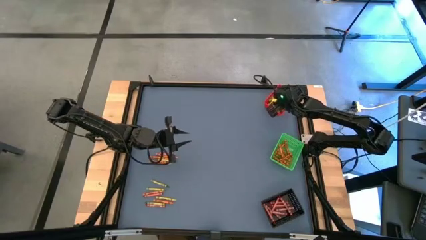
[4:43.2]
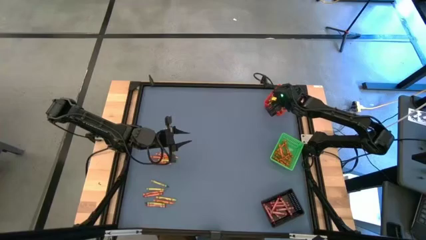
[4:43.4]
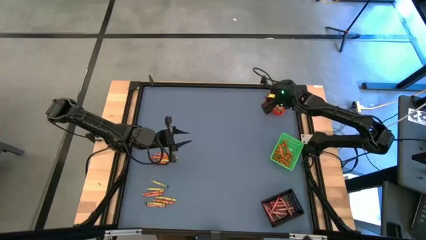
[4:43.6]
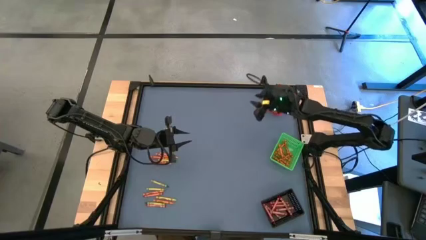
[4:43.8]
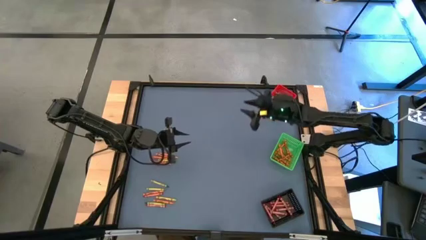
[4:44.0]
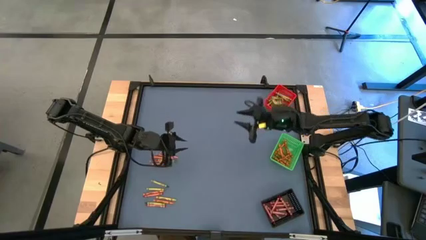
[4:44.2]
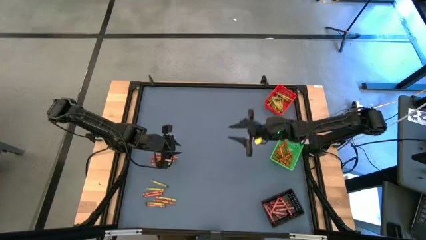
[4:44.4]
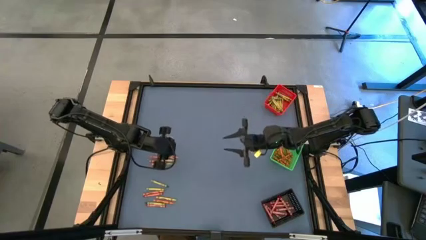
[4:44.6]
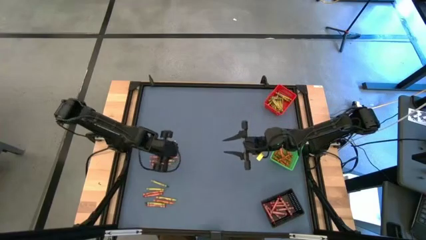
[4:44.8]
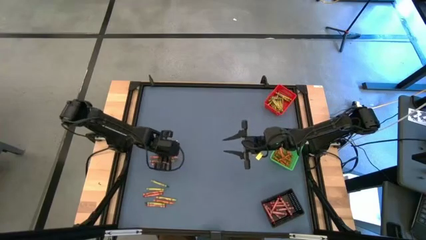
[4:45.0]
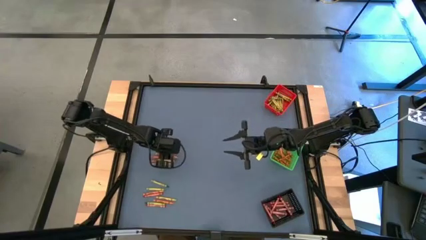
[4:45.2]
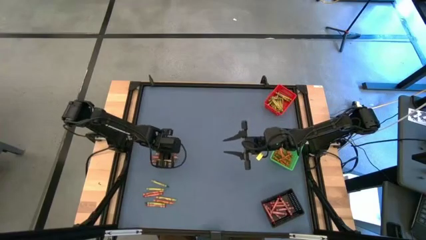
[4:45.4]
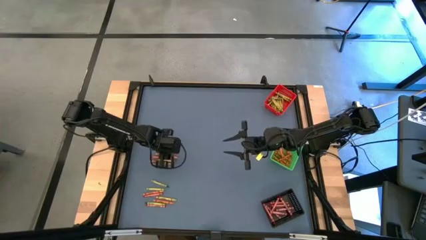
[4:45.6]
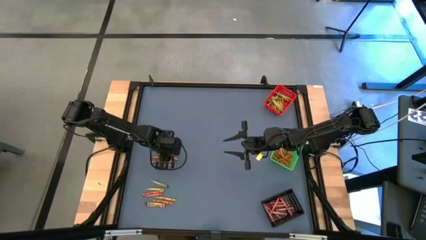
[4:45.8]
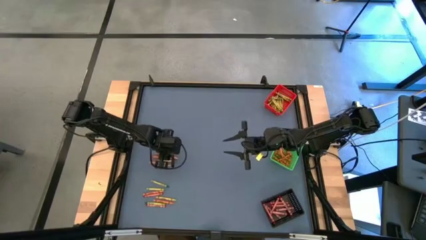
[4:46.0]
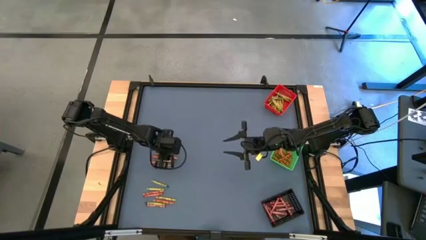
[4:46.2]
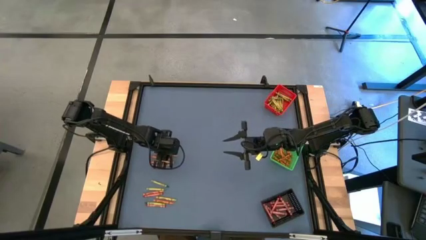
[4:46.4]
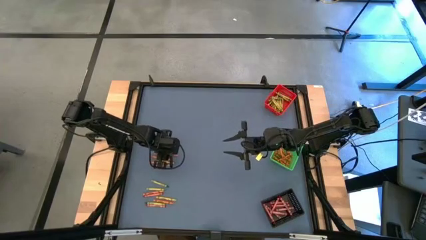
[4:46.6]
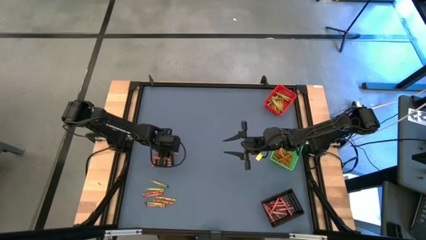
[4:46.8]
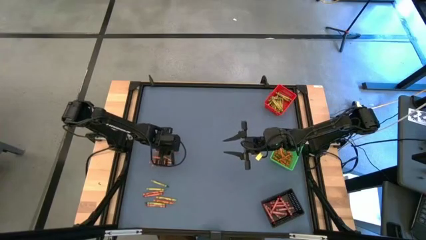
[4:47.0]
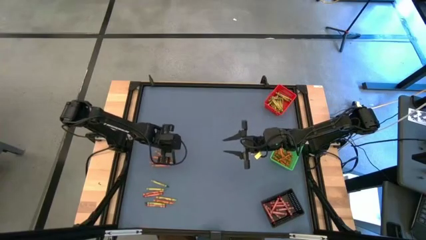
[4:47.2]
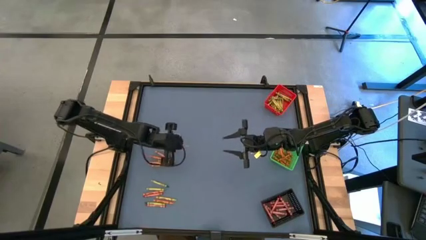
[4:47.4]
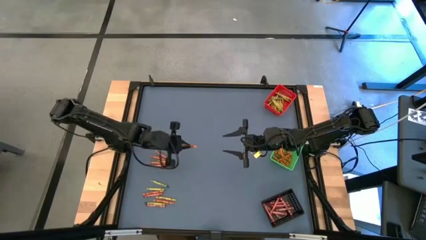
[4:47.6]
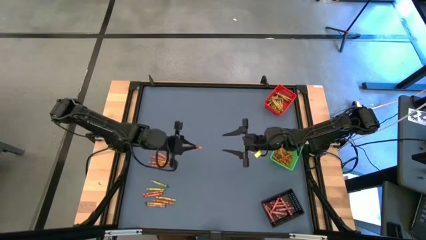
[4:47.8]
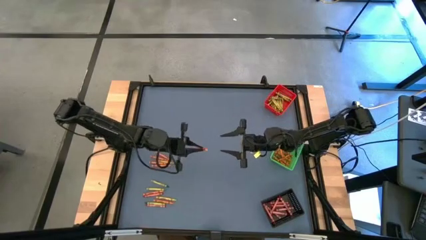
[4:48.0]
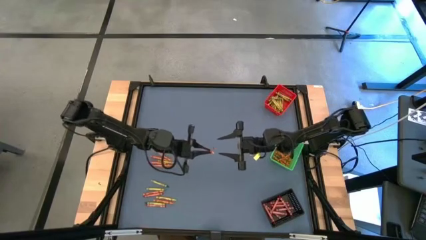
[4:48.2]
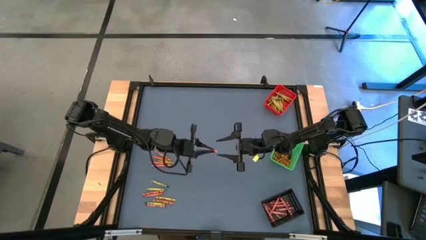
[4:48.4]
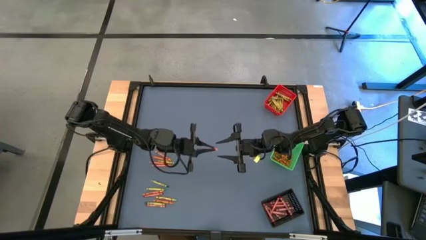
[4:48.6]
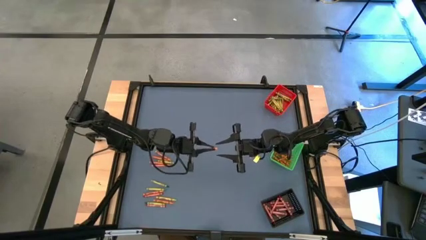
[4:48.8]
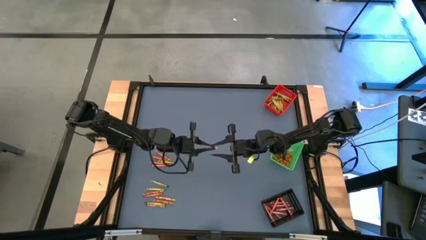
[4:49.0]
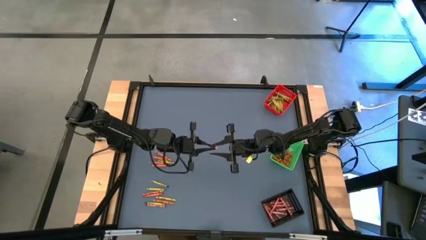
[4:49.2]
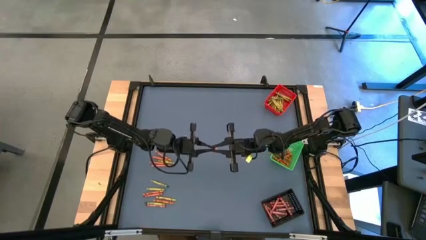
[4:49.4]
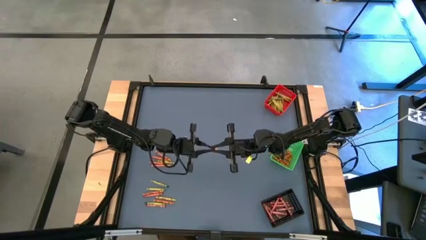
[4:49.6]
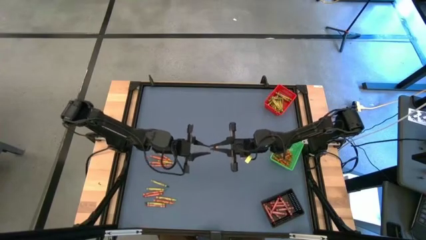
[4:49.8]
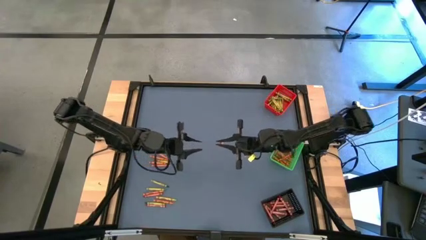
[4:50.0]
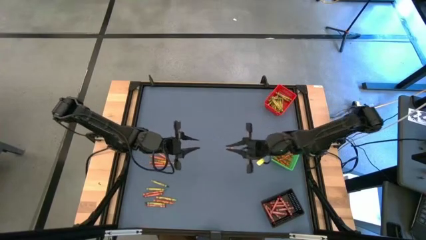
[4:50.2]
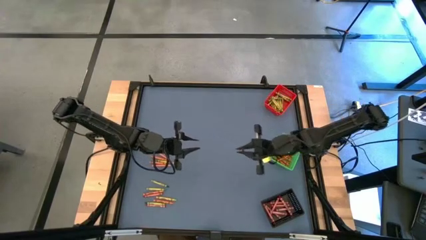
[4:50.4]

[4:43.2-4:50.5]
Task: Sort crayons
Put the orange crayon into the green bin

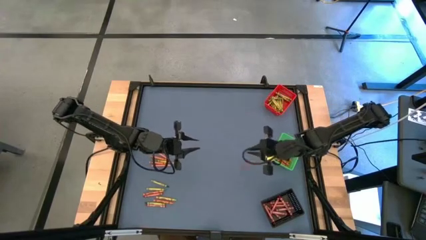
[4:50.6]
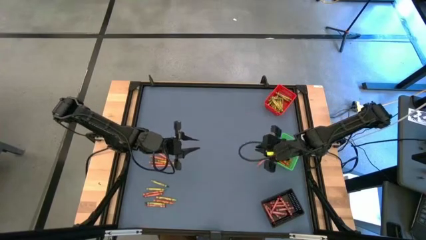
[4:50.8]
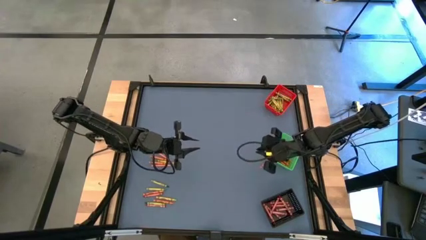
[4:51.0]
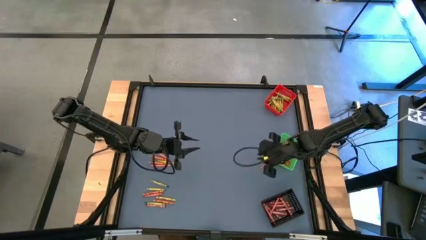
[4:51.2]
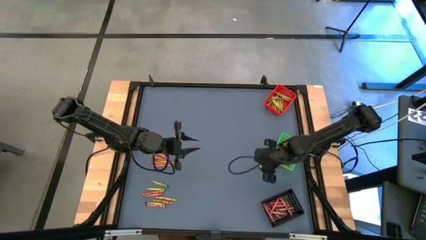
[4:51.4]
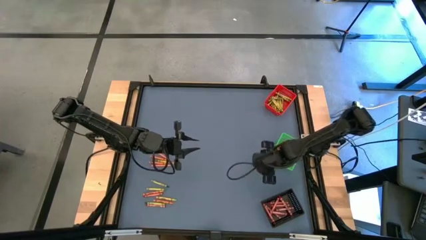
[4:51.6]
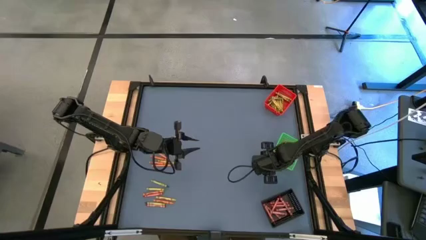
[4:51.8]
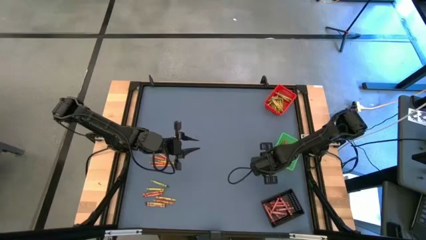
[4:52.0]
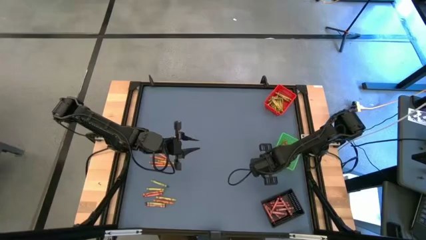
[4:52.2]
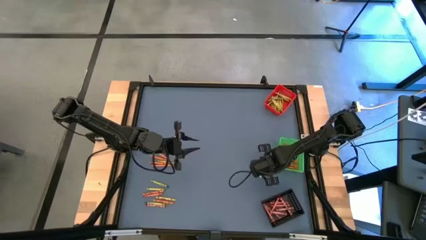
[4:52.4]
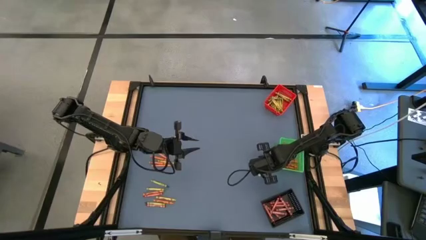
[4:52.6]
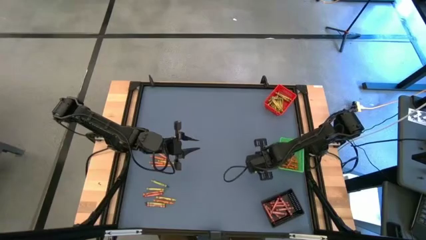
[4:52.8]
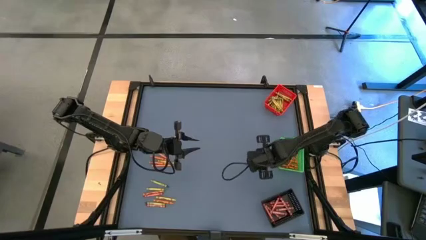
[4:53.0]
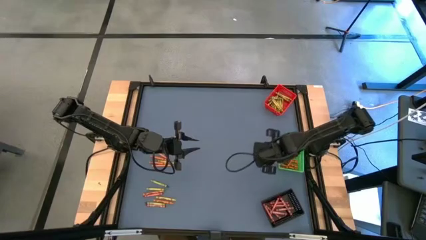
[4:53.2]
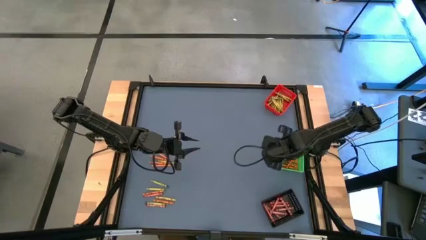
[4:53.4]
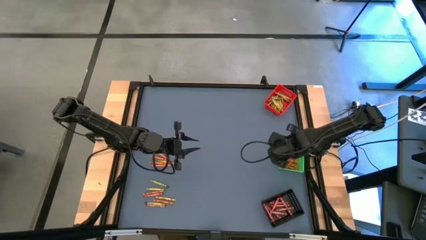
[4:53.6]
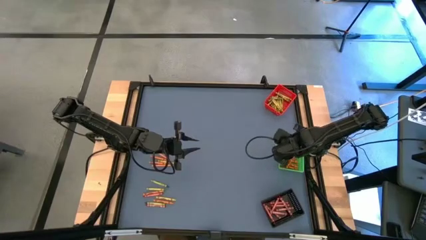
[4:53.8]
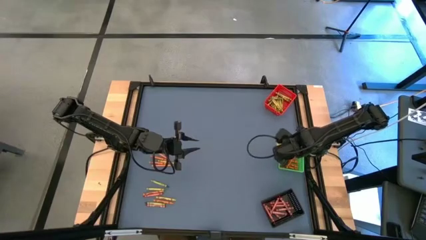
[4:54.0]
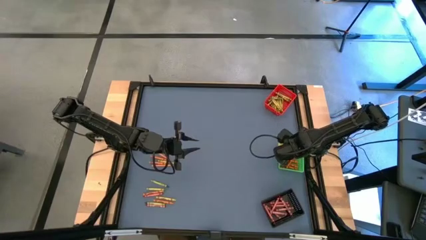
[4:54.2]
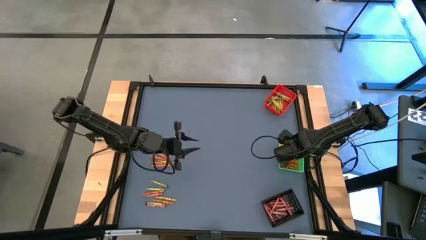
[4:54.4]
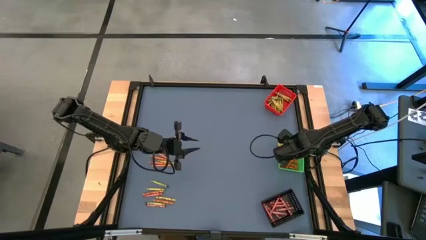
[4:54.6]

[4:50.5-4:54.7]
Put the orange crayon into the green bin
